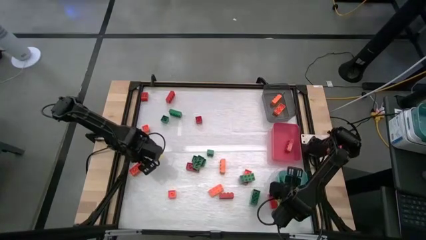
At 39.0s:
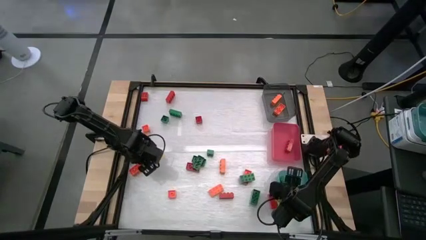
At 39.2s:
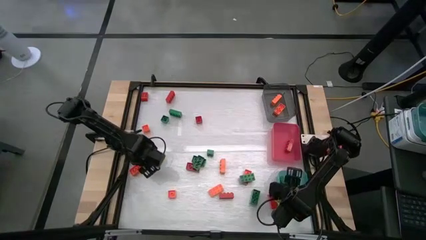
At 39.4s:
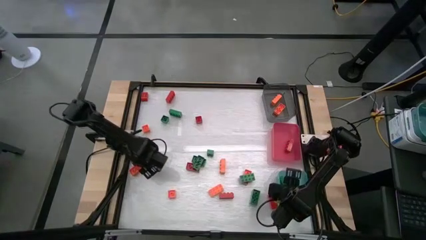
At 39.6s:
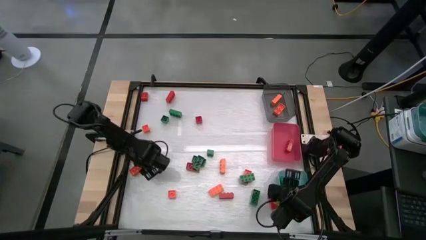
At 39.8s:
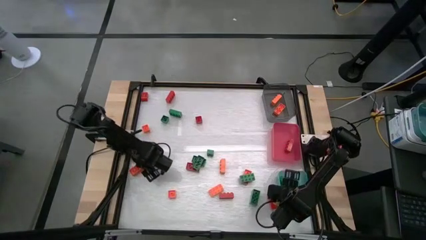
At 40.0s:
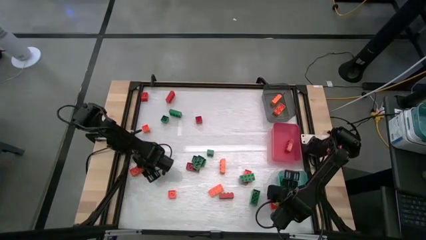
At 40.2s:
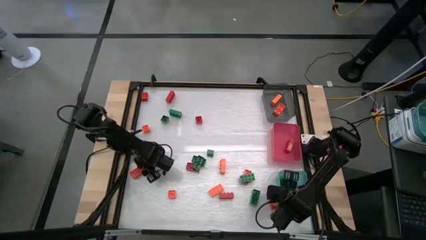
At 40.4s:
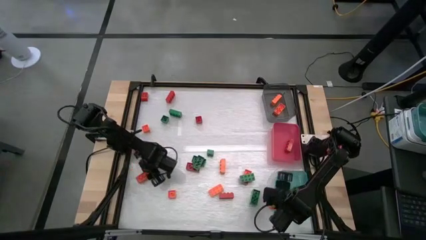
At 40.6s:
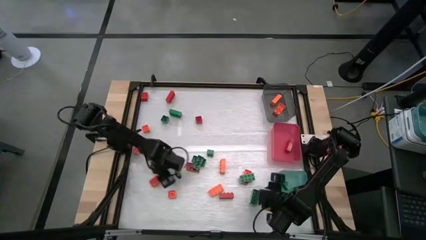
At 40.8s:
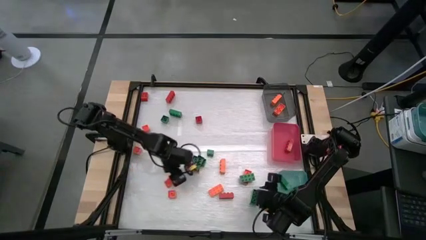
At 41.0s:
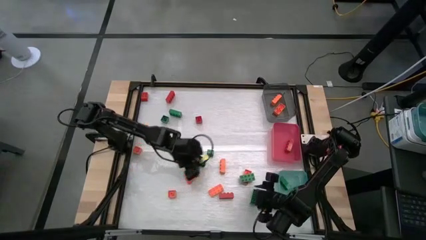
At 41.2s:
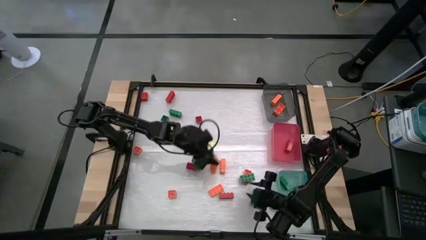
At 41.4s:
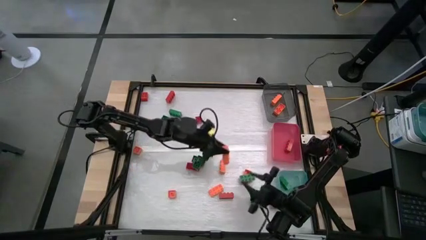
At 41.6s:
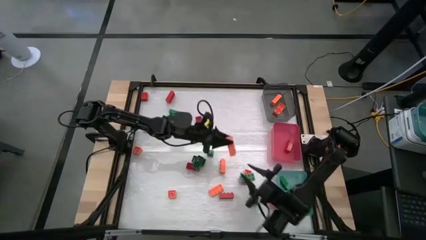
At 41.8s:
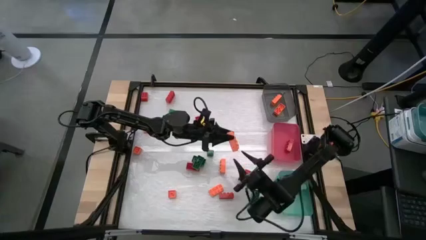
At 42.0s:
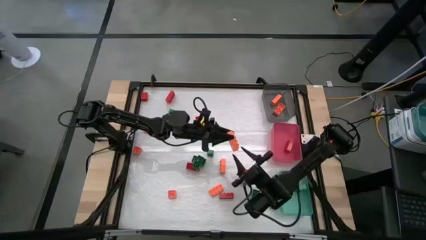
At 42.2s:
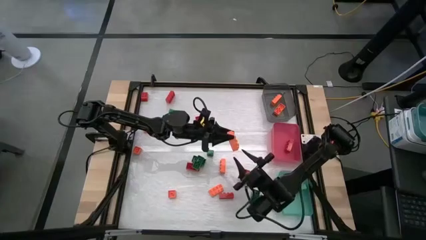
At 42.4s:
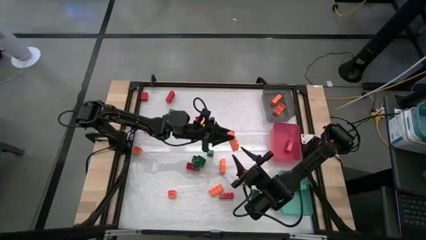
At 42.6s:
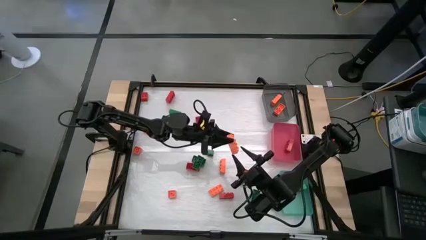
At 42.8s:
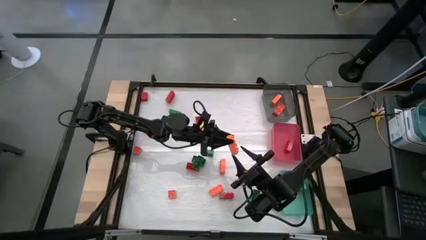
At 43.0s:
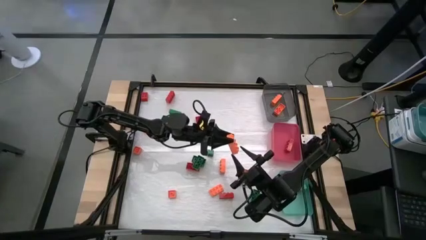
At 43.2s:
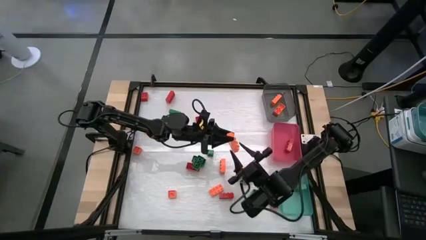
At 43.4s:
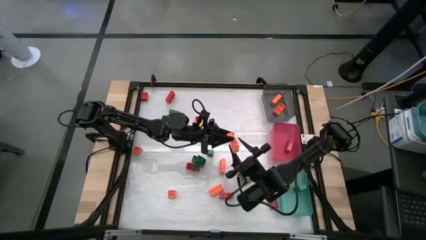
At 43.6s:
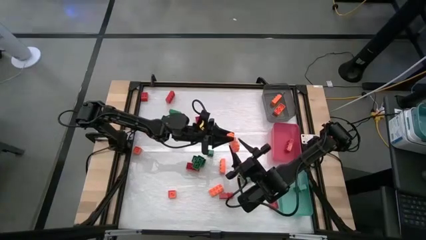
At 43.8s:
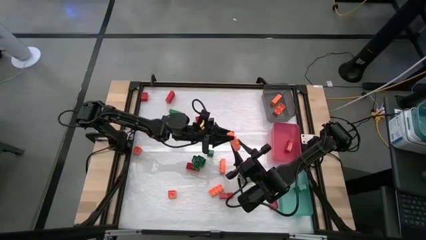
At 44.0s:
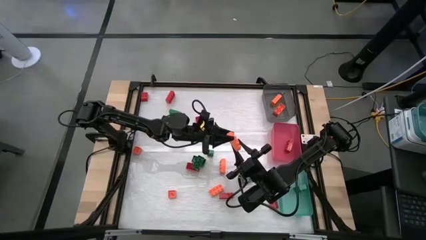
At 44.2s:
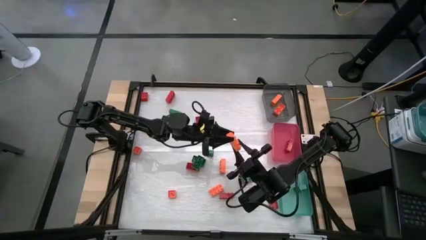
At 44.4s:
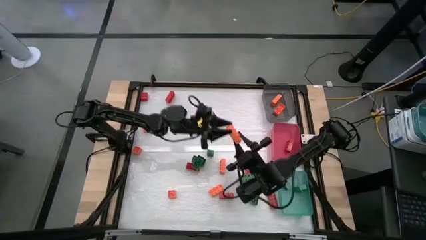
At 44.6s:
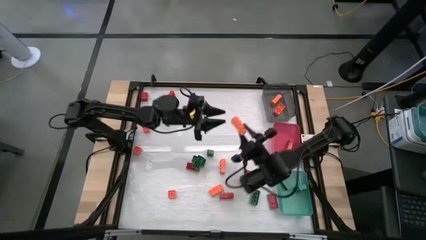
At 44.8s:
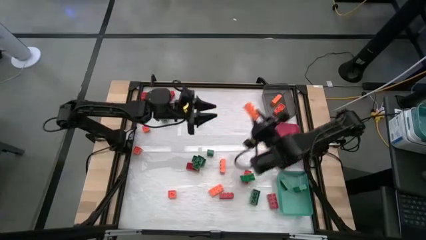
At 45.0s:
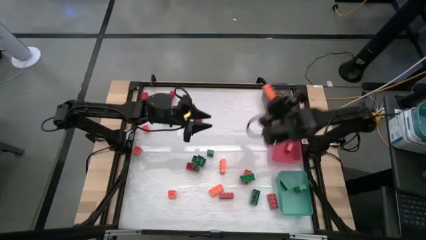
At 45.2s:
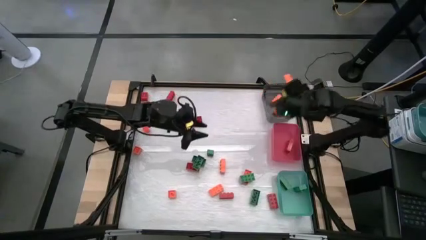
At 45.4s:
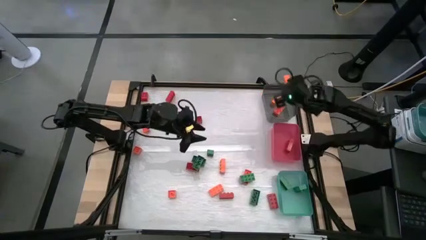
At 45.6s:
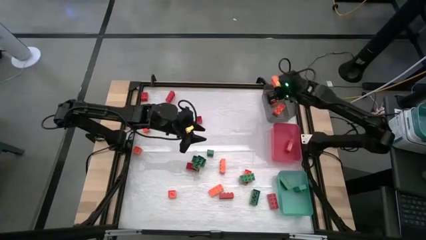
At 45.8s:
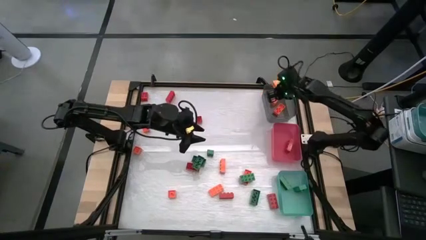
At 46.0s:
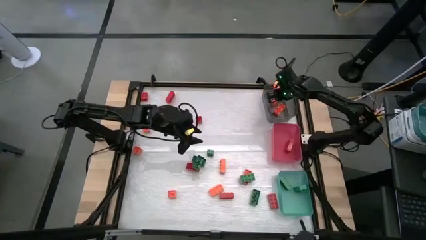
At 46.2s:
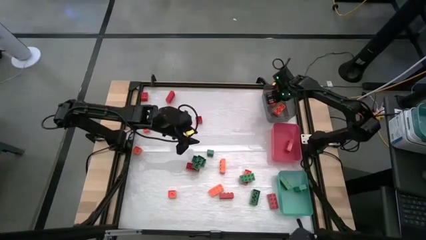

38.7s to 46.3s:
Task: Sort blocks
Put the orange game piece into the black bin

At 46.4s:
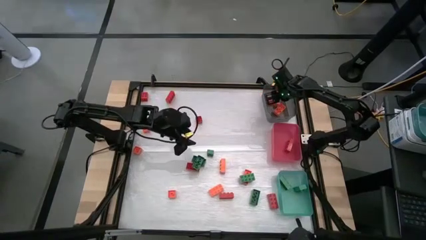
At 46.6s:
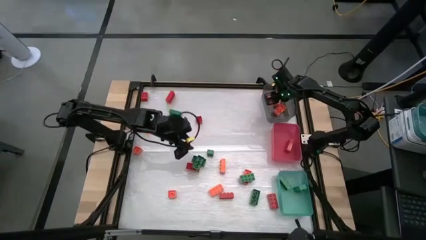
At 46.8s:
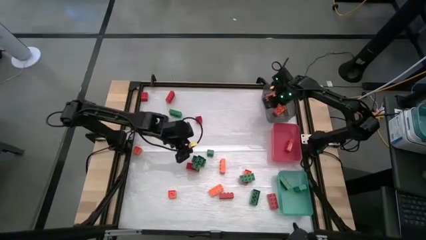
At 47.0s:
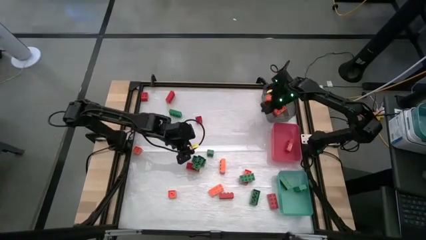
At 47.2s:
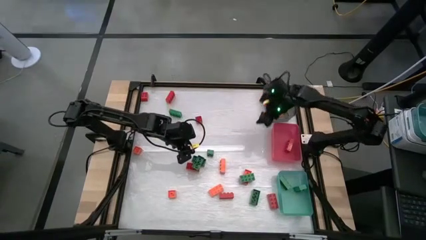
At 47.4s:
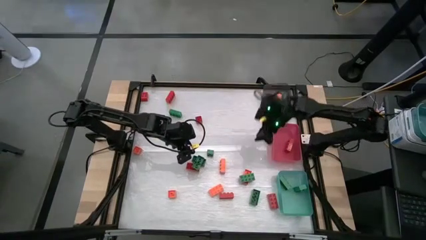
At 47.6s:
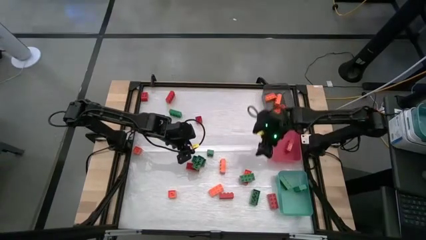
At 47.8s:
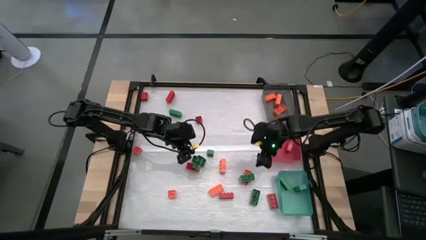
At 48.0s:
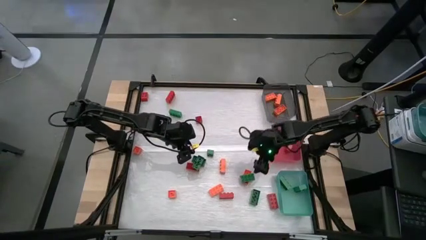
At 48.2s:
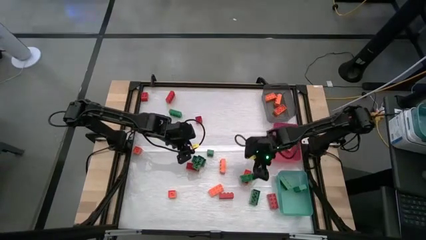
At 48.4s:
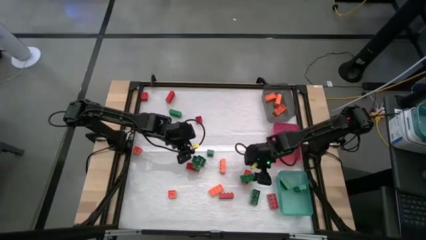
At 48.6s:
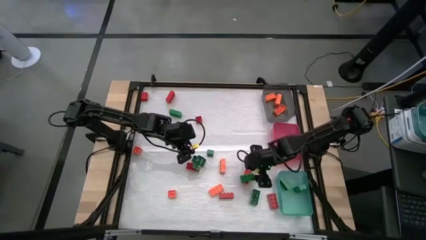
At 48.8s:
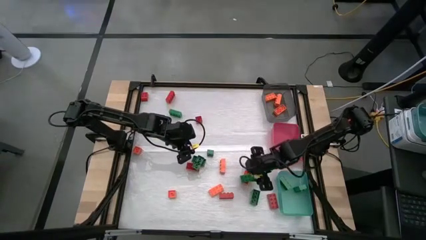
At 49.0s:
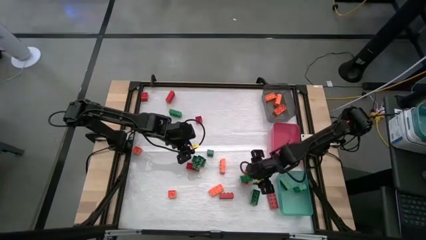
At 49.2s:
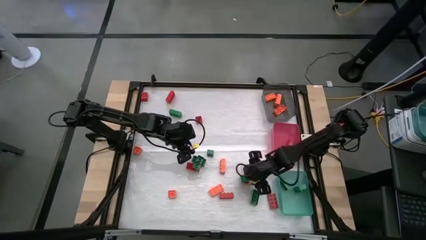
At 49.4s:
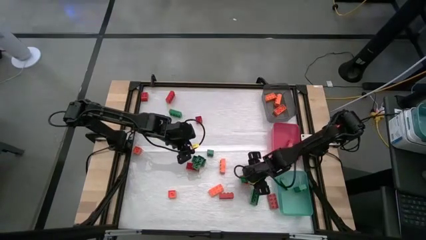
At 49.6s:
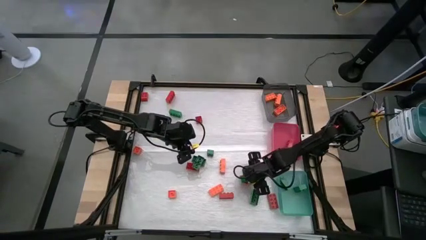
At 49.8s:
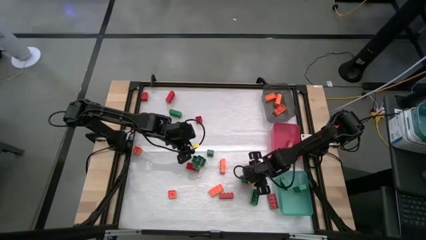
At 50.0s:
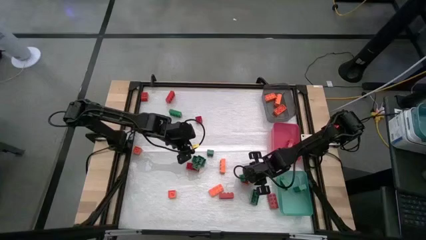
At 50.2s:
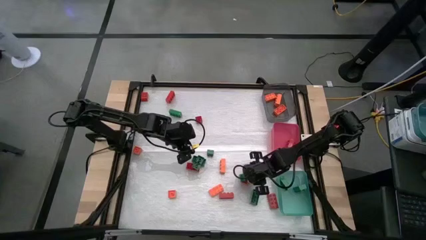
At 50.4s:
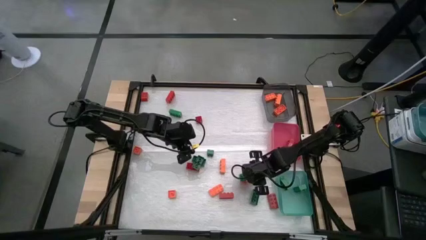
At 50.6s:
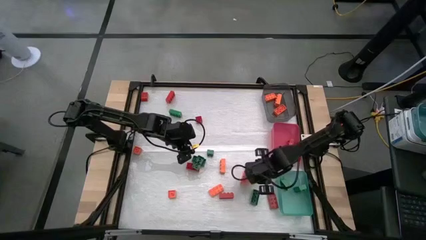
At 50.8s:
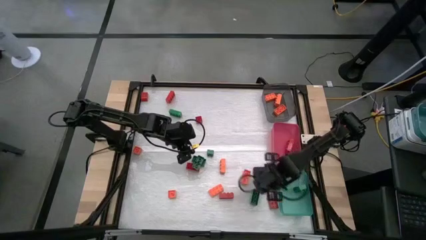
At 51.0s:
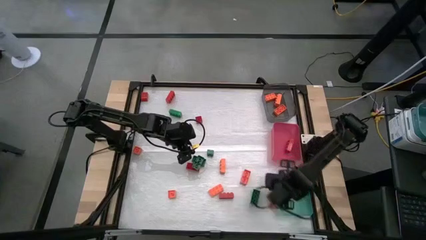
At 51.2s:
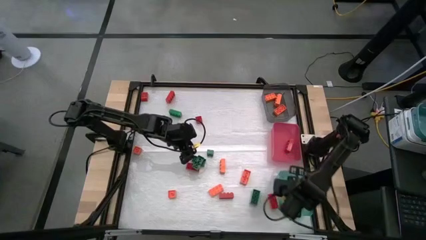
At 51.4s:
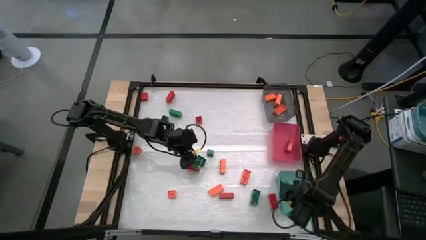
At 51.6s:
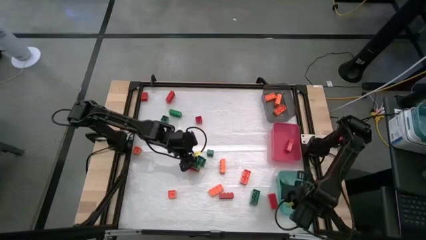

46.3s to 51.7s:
Put the green game piece into the blue bin

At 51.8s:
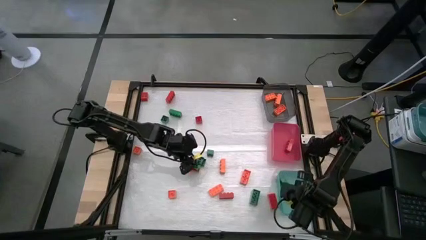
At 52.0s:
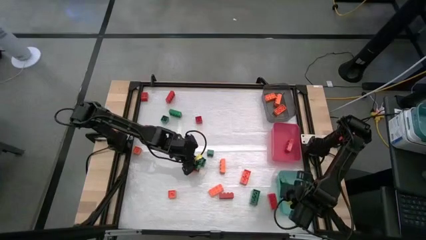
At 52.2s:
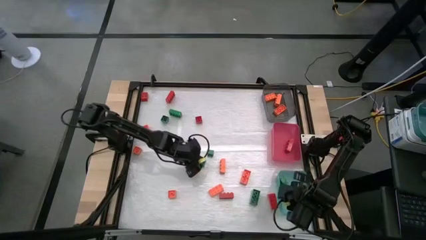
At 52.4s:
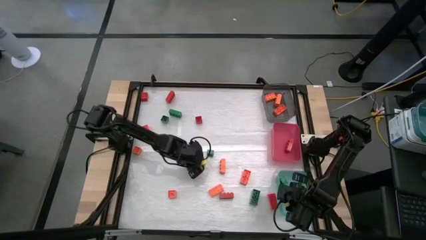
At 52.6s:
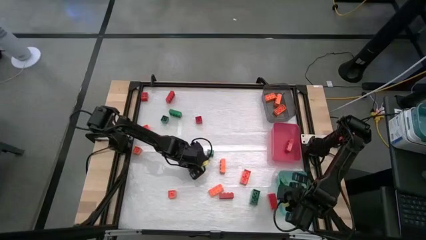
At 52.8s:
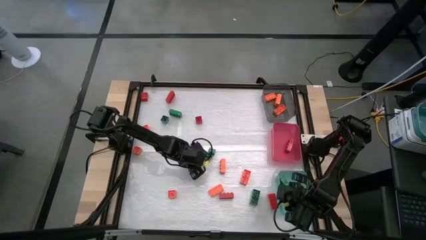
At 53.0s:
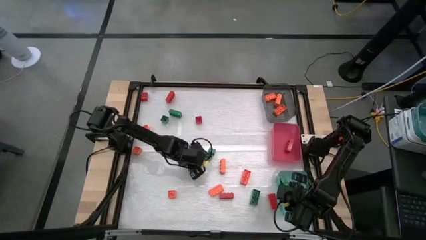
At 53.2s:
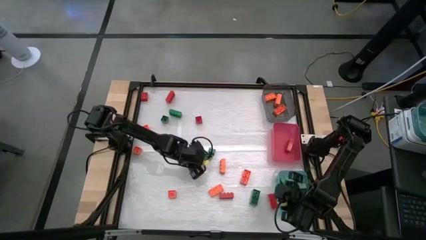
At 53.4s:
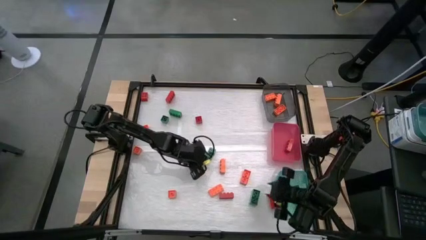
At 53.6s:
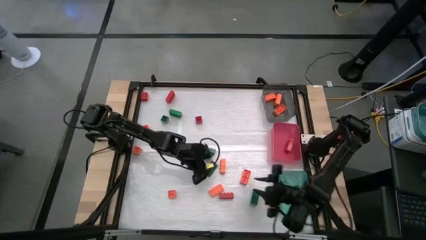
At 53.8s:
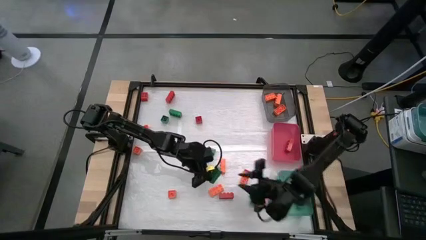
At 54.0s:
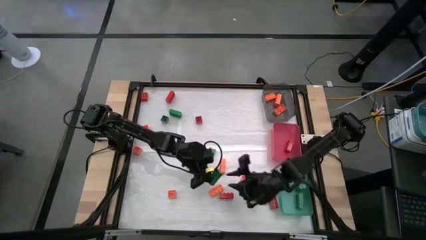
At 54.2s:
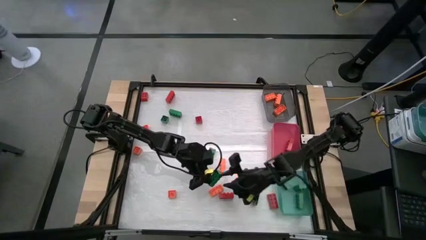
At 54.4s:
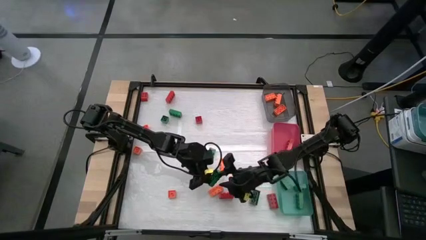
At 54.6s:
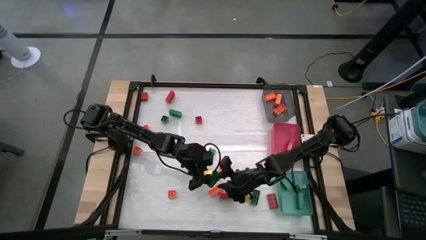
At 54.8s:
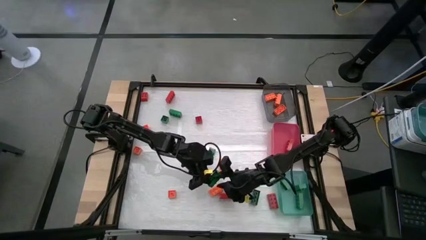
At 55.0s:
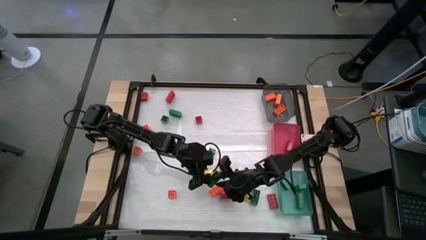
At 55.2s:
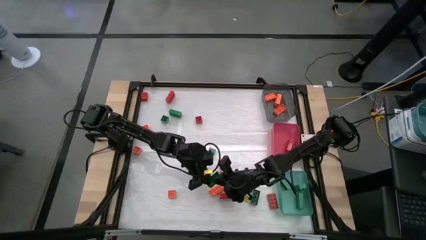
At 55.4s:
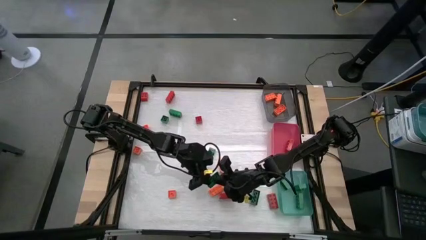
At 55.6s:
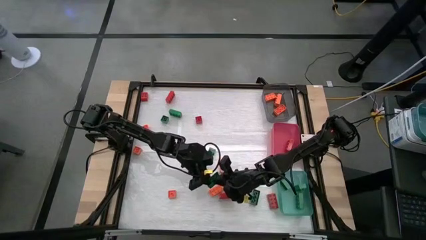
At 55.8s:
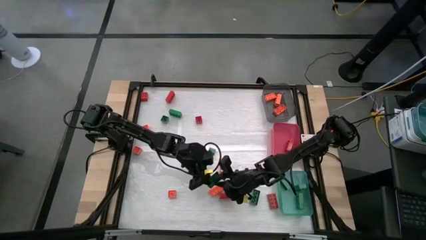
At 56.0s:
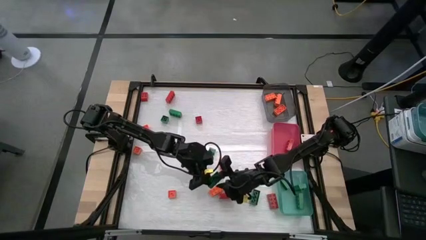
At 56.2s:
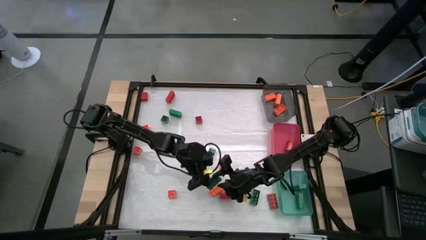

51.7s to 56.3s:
Put the green game piece into the blue bin
